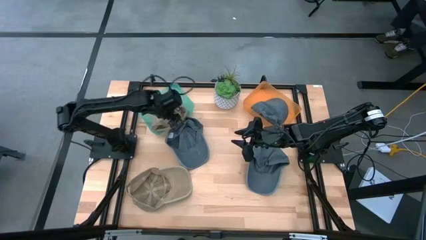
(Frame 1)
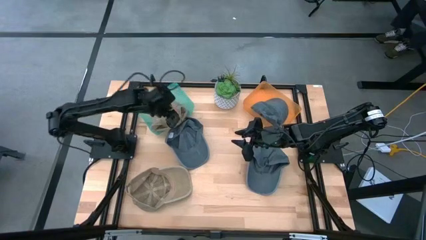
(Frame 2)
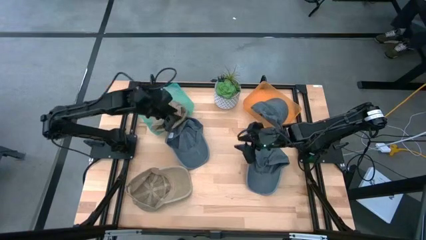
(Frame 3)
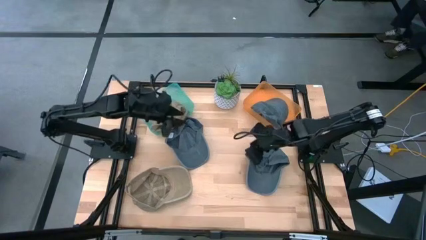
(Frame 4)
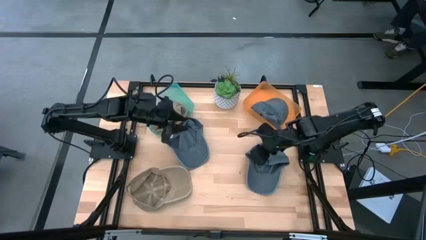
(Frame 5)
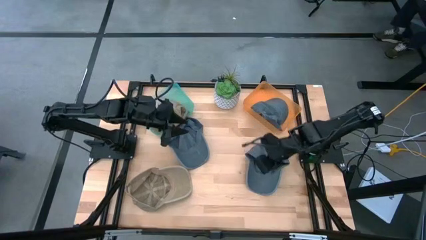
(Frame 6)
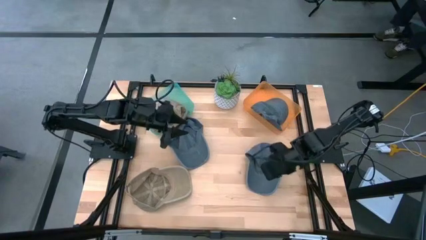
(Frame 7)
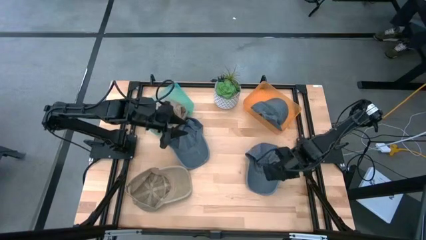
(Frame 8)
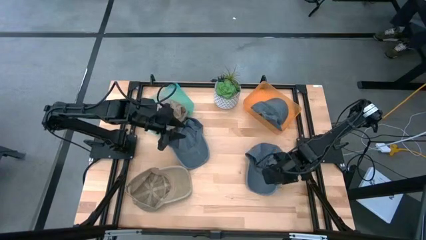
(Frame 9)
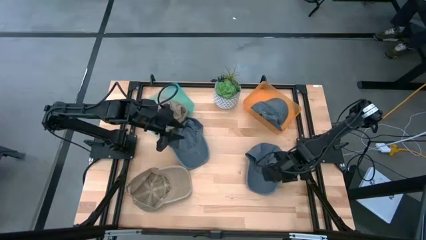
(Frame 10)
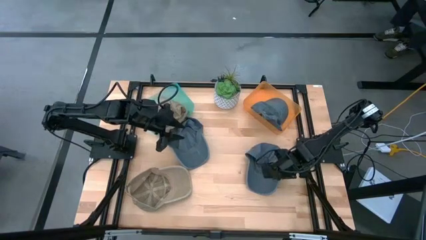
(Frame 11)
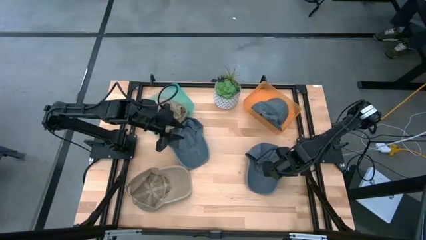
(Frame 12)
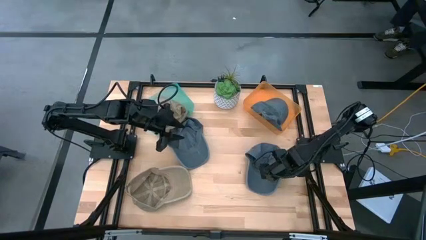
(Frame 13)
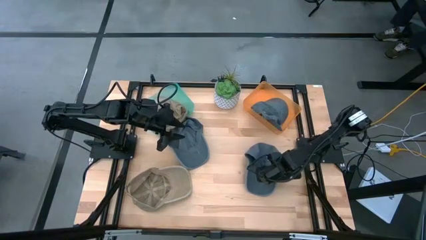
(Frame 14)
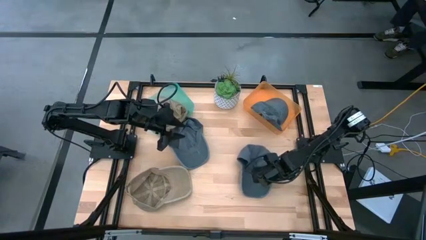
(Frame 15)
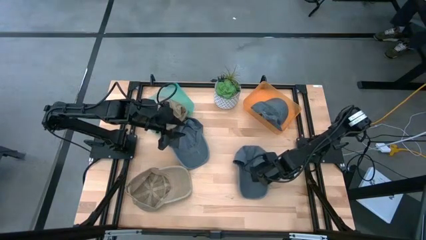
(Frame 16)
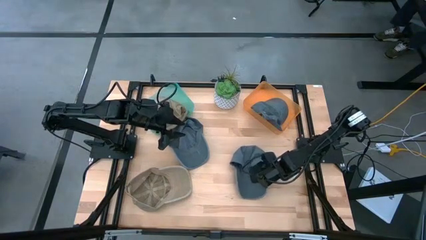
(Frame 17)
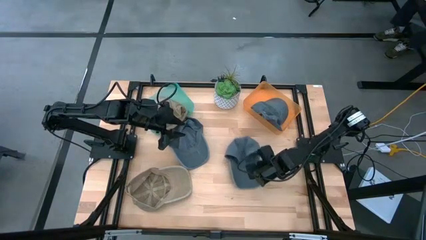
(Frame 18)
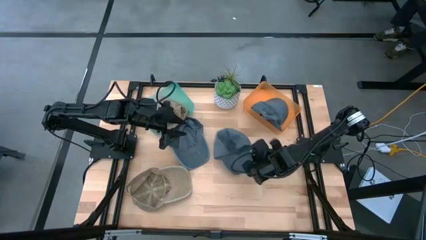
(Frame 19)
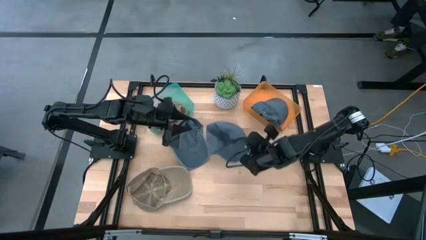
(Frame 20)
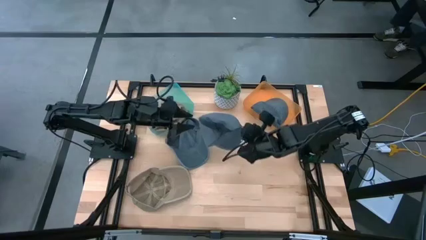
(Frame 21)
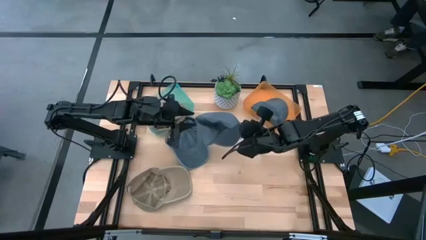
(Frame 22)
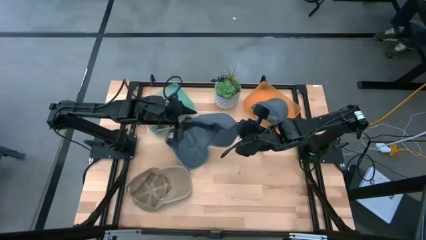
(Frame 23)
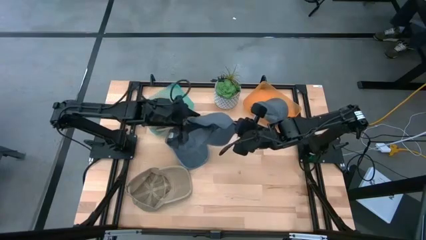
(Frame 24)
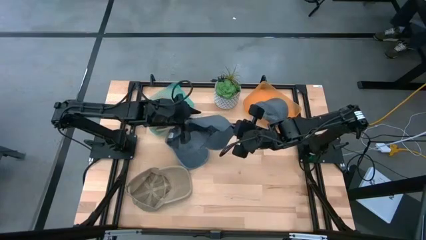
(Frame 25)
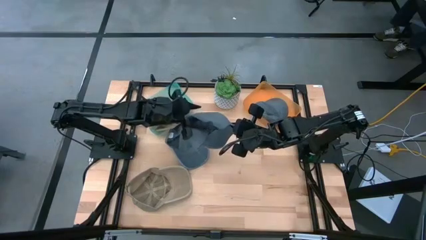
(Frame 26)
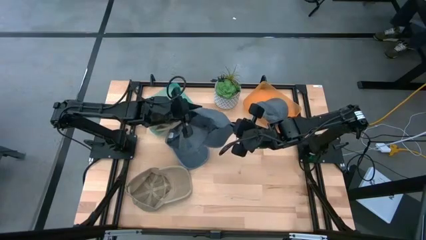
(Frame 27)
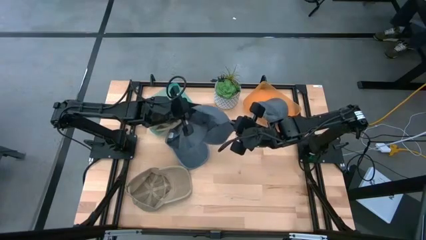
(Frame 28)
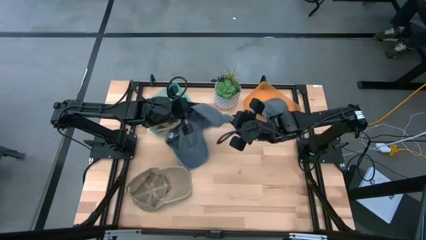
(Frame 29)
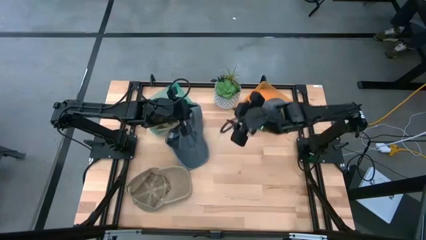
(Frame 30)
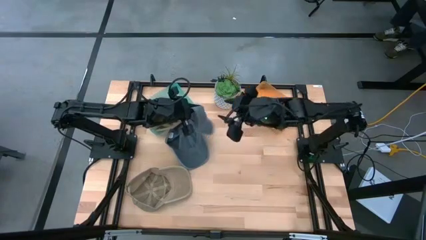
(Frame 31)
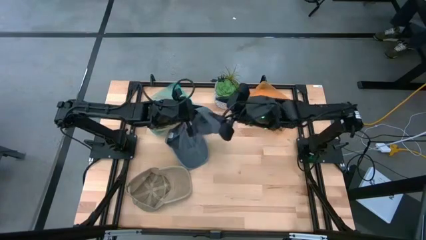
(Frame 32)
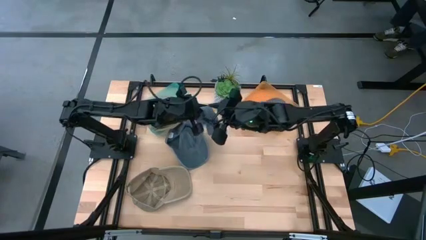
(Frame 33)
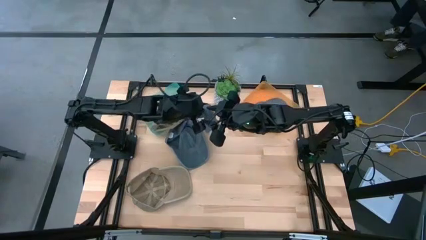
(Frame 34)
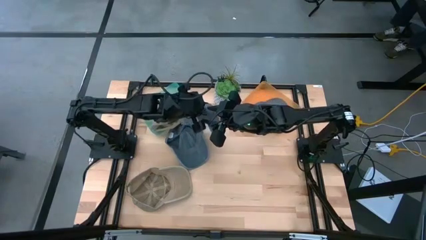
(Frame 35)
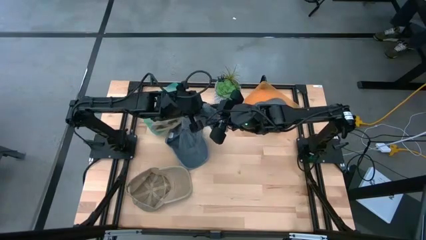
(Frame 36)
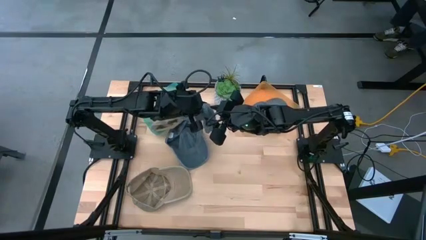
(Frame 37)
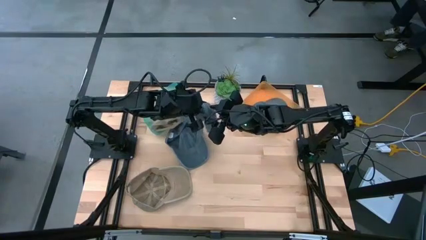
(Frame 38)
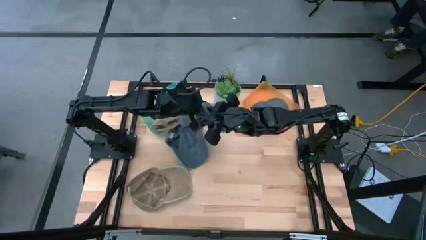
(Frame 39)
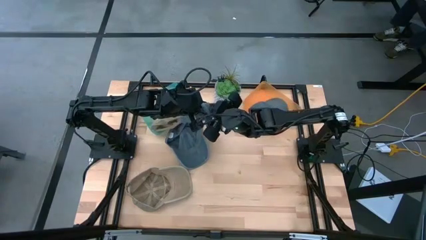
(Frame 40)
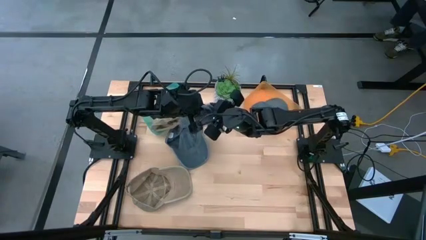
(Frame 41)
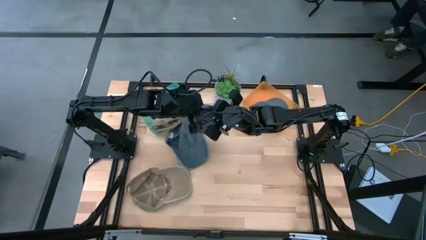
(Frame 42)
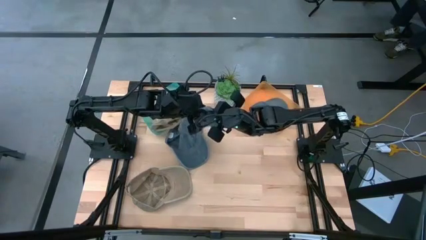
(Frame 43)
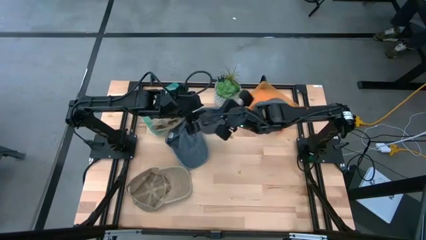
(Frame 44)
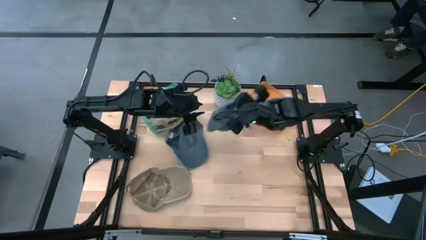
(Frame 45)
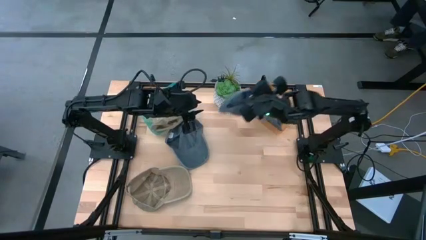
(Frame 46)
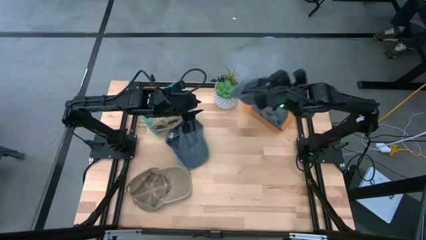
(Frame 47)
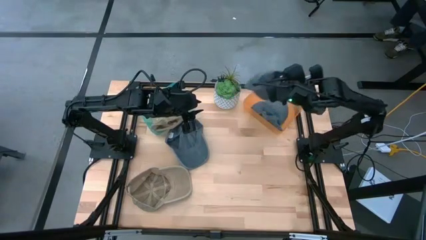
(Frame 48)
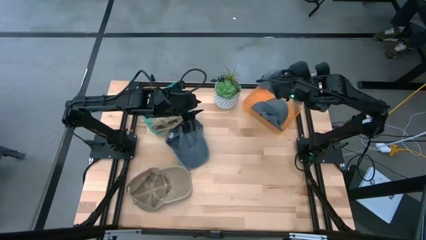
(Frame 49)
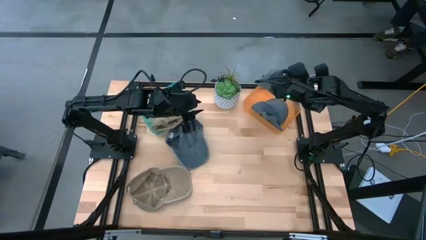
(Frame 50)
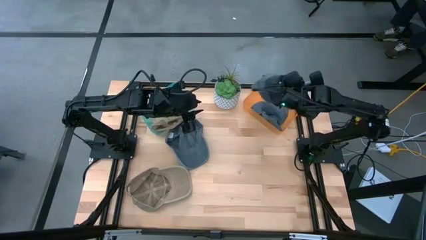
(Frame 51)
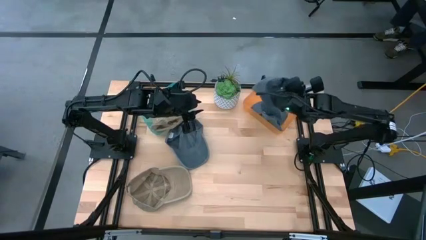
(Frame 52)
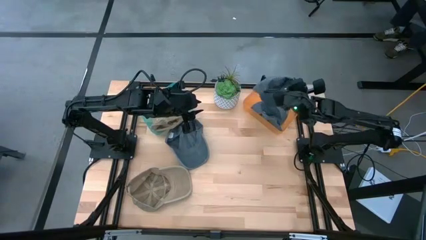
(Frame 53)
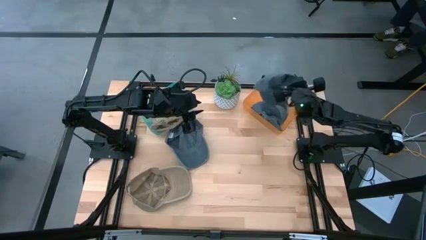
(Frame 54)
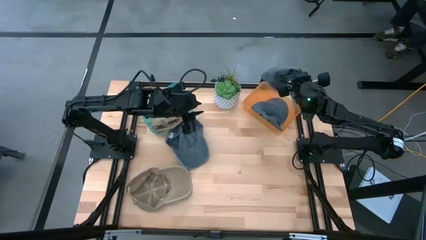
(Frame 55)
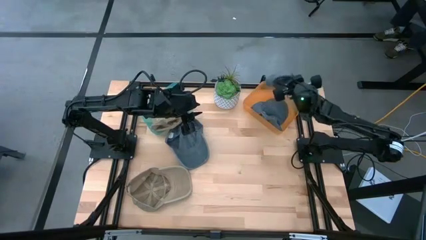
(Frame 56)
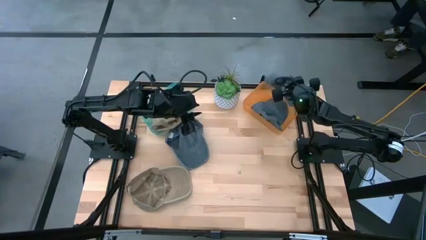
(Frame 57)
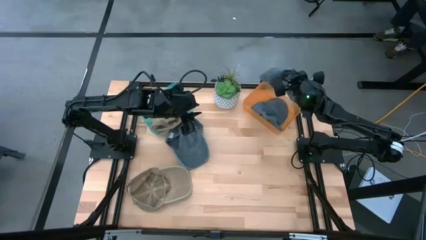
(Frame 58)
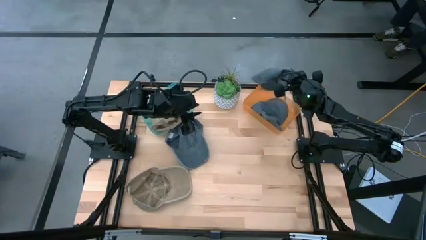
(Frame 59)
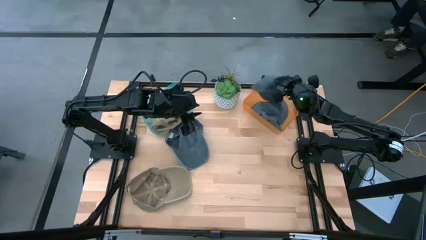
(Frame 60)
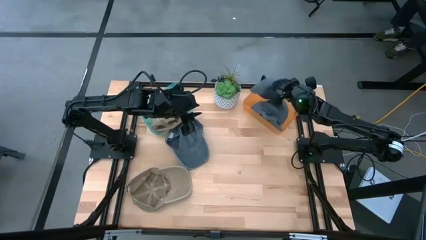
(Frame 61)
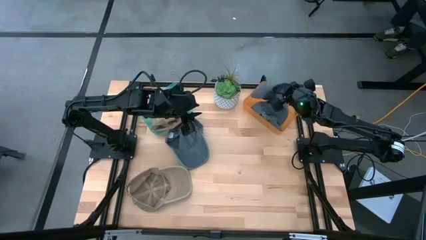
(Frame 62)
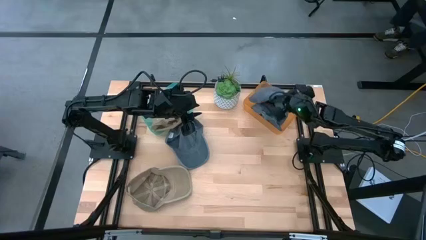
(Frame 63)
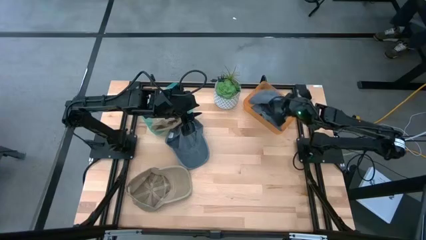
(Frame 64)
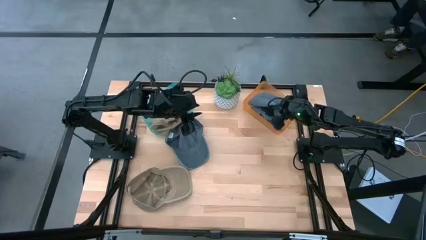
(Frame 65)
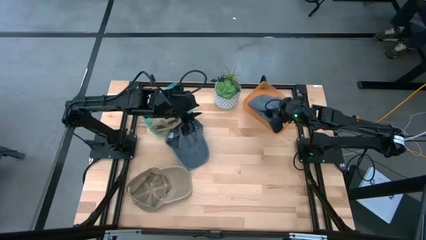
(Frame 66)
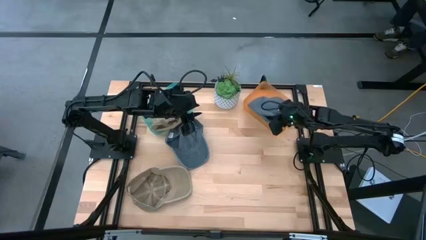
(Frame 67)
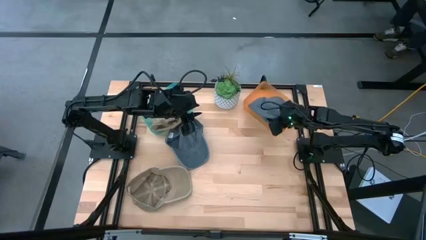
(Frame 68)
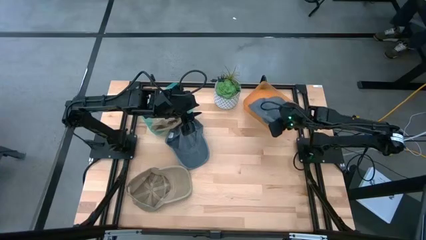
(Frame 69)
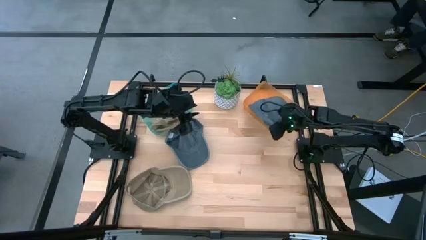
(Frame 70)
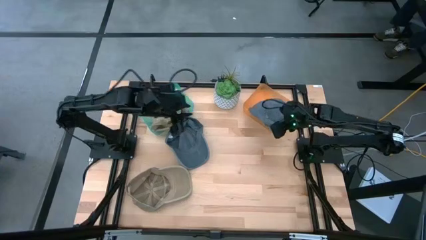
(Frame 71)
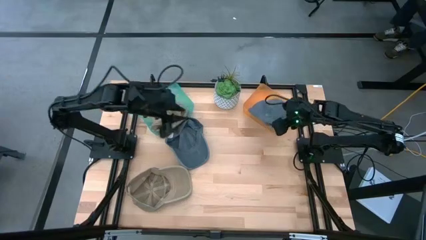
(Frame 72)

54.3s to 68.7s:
Task: Pick & Place hat
Put the right blue cap into the orange bin
